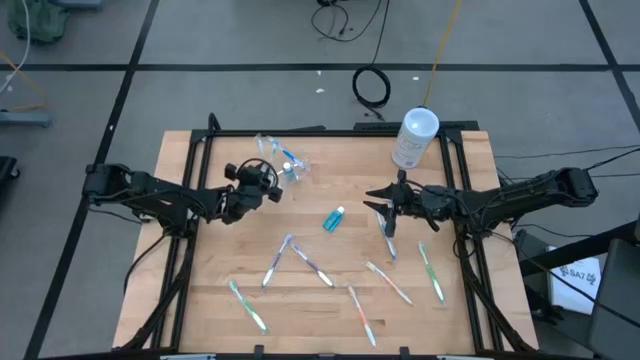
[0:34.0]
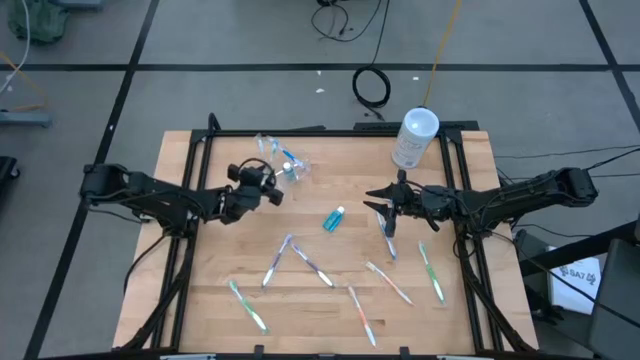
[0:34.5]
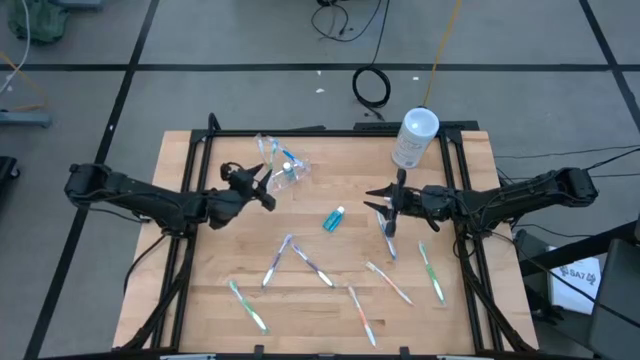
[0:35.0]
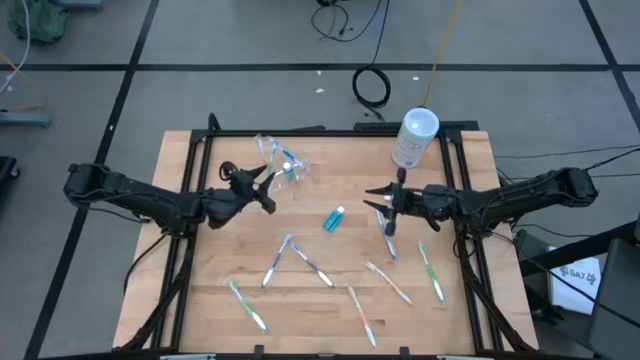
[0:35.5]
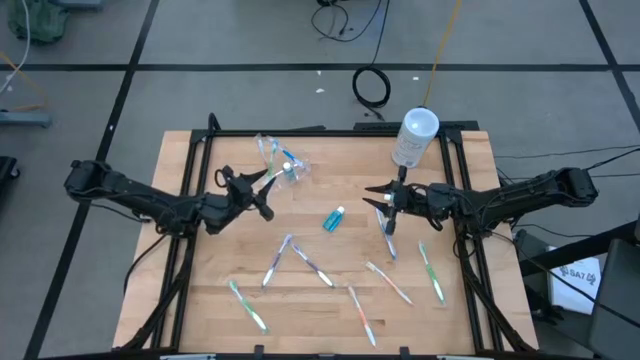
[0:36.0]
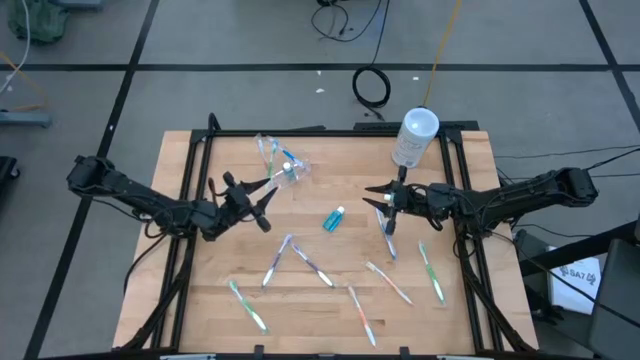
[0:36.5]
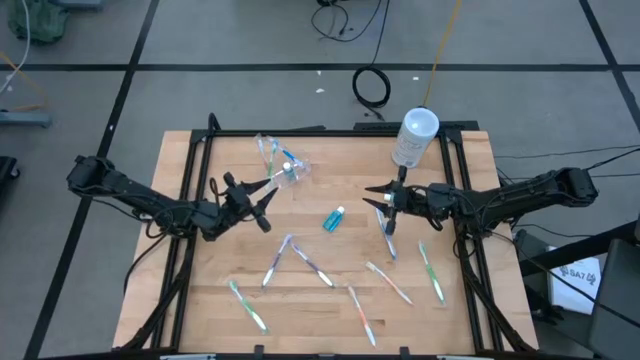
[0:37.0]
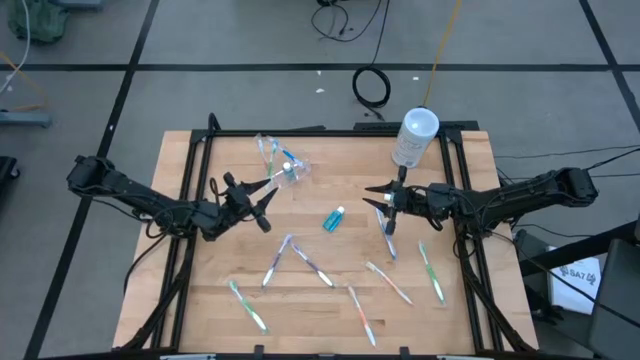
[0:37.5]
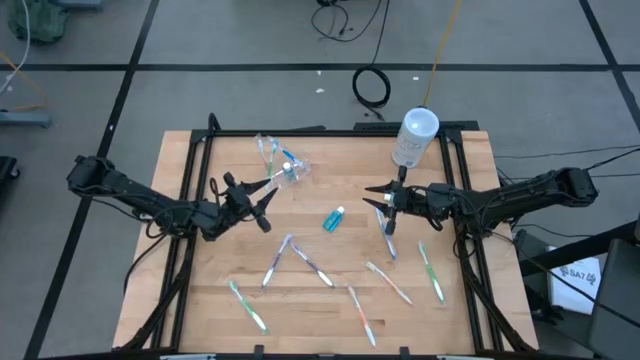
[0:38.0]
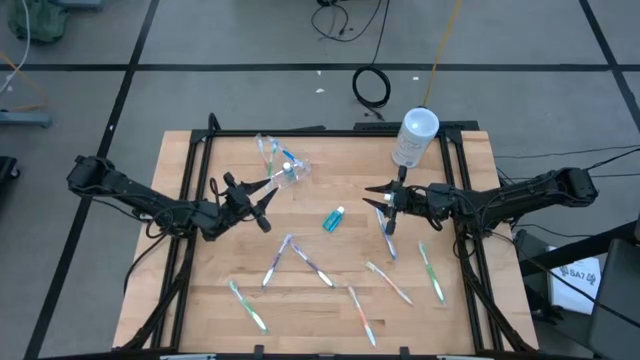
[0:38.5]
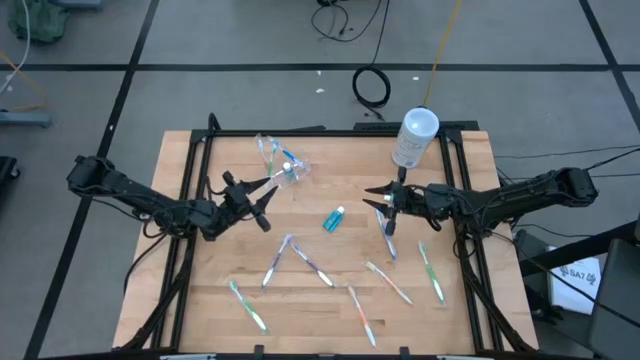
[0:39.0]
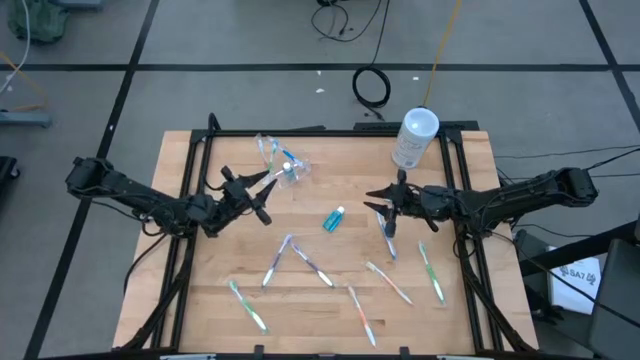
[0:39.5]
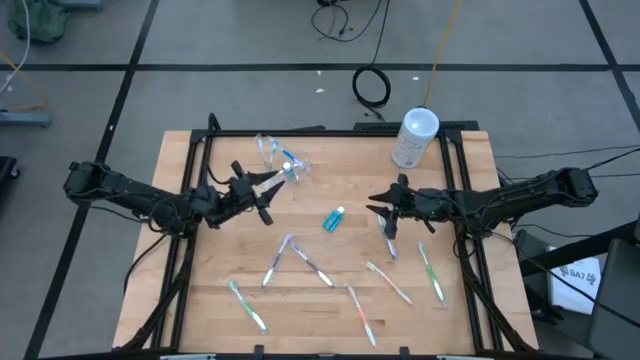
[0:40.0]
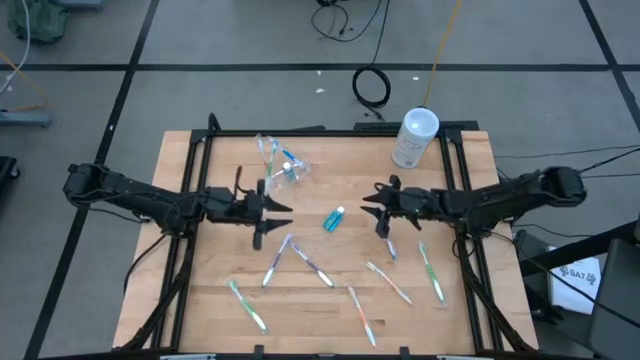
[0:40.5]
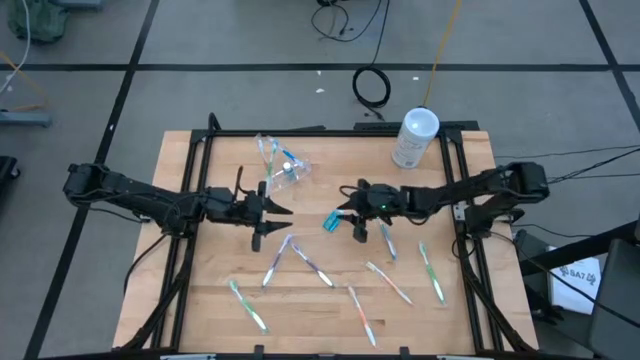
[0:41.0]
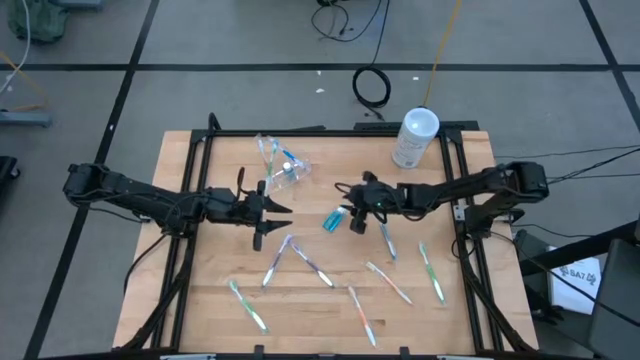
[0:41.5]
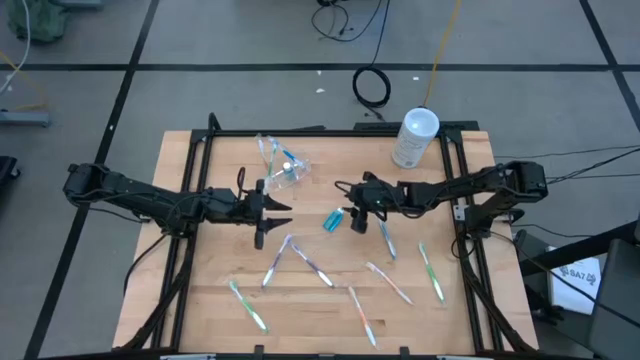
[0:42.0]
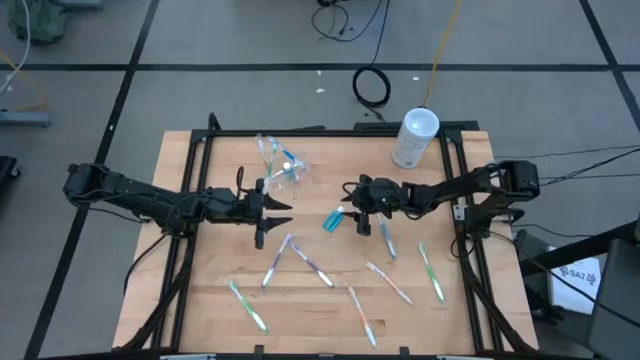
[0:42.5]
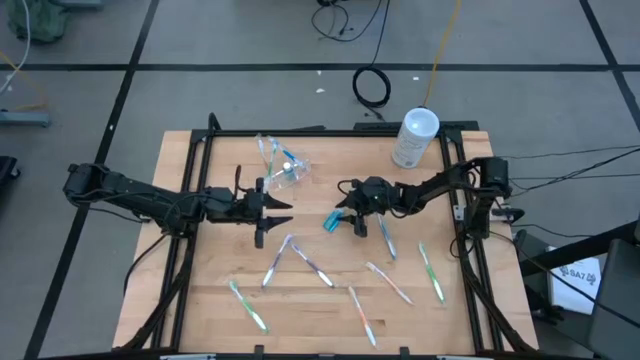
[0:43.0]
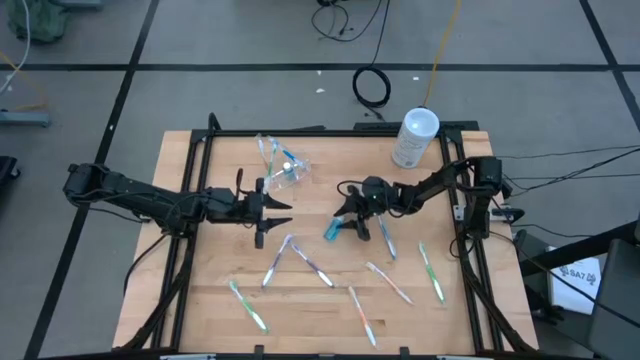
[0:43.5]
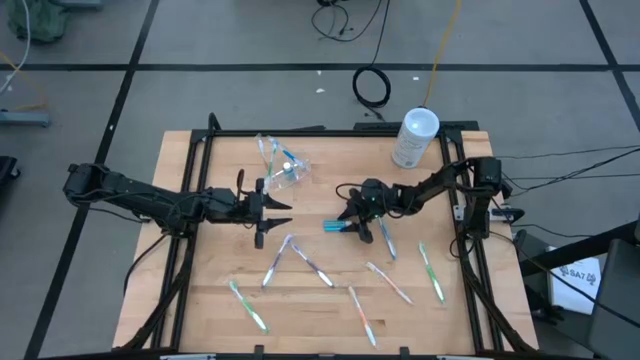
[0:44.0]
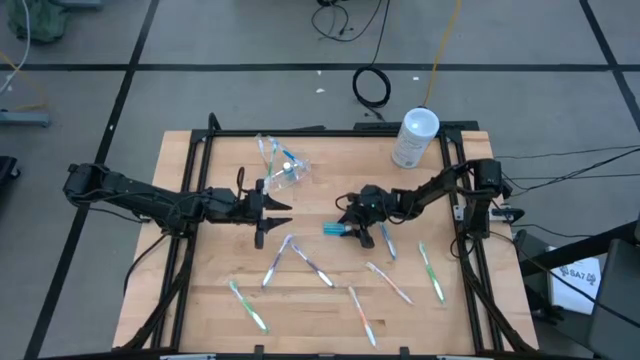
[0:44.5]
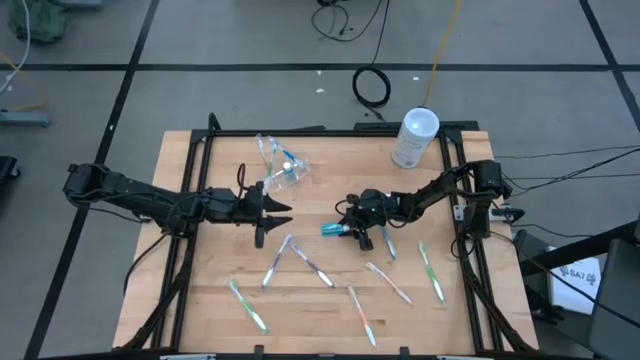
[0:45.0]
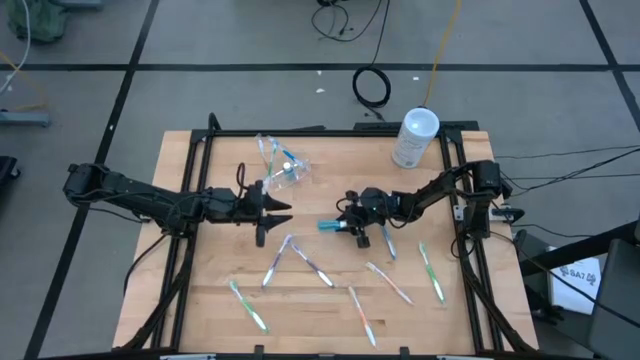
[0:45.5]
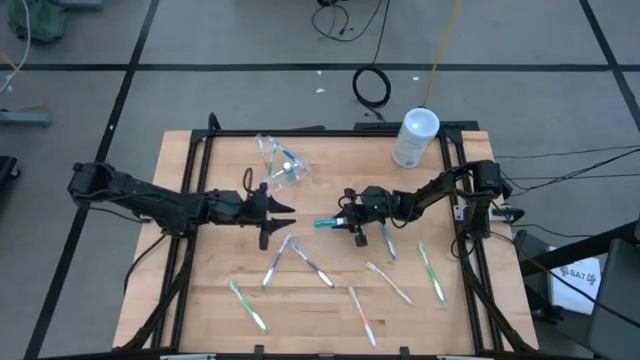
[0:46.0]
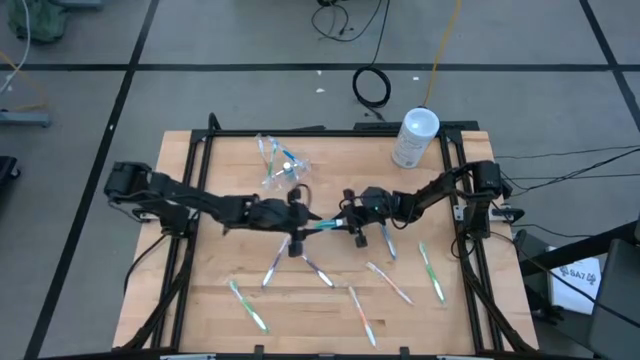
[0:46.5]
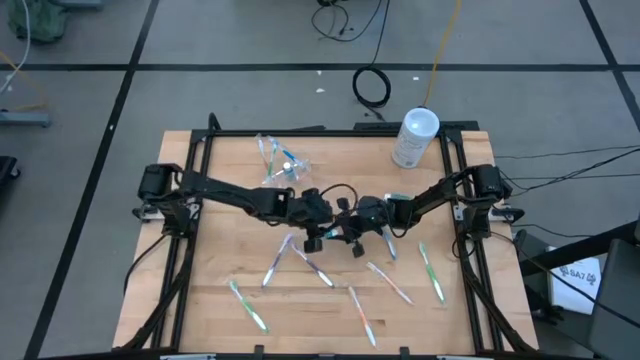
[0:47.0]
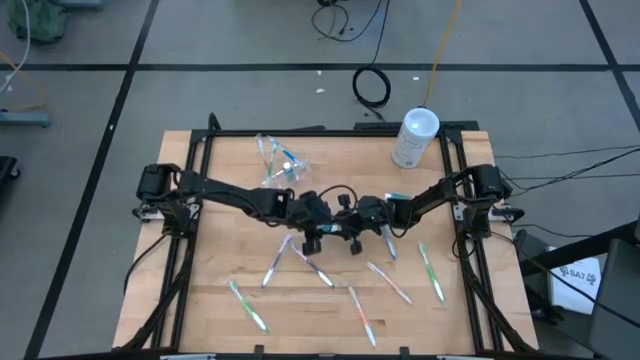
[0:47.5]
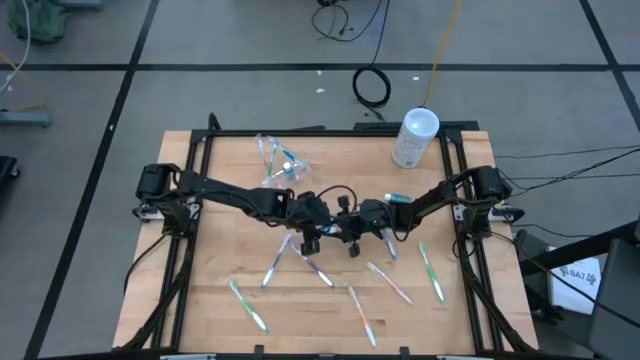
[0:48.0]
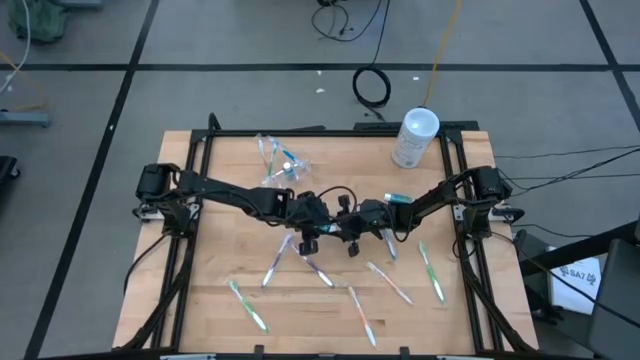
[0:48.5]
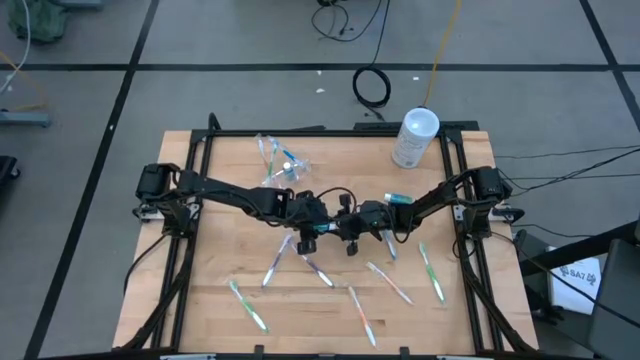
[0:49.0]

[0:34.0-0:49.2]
Task: Pick & Place toothbrushing station
Put the mouthwash into the transparent organizer

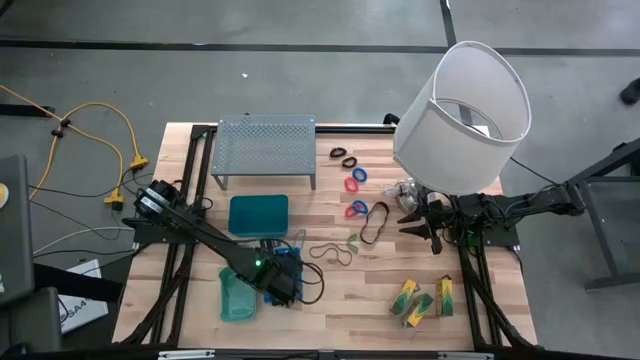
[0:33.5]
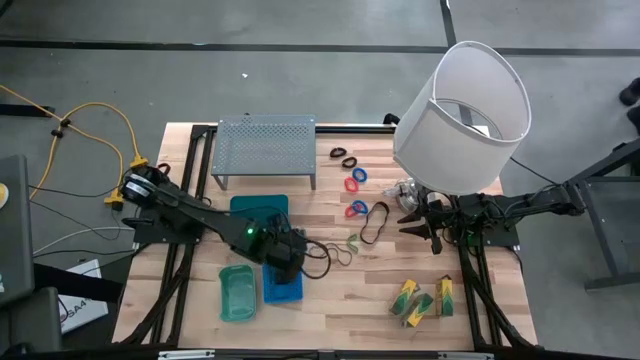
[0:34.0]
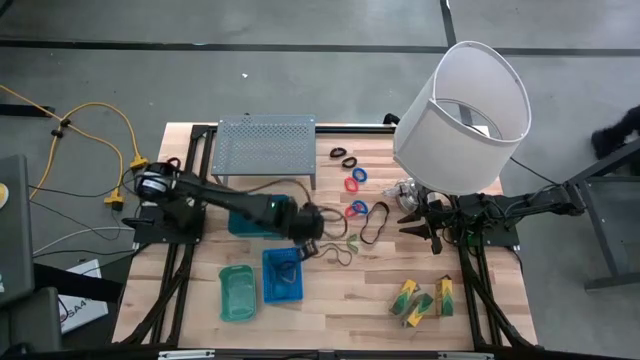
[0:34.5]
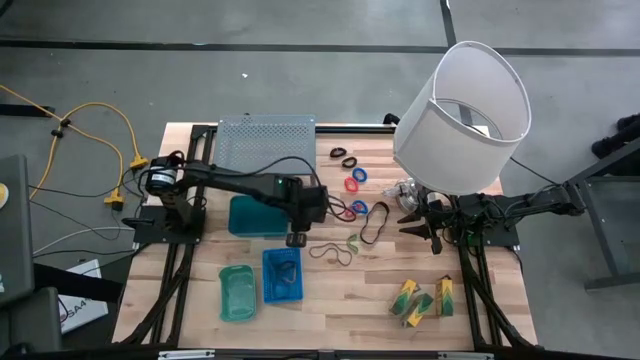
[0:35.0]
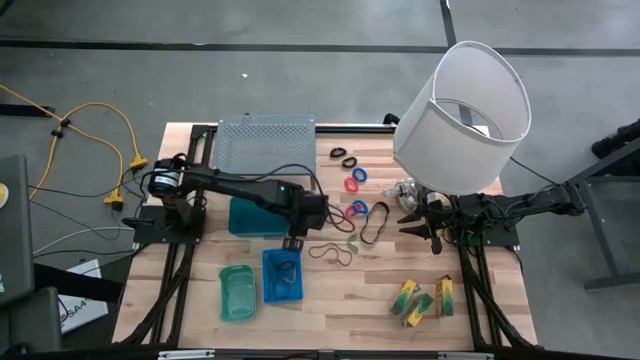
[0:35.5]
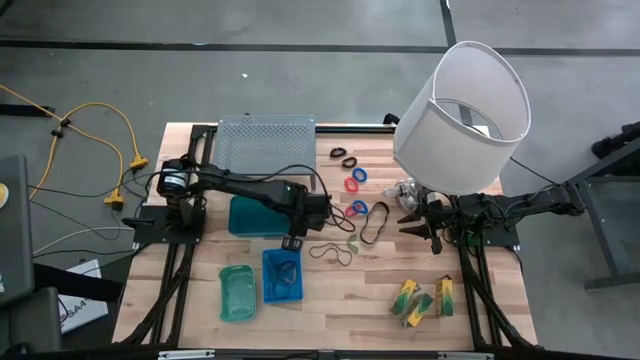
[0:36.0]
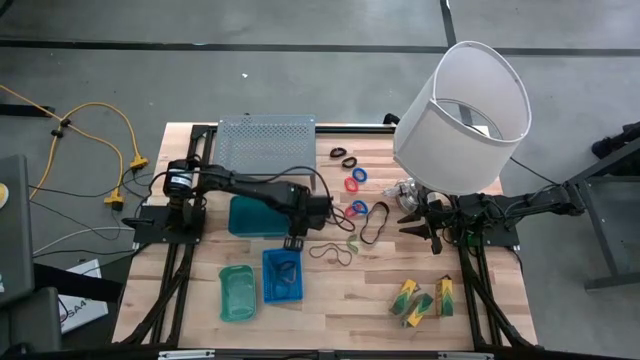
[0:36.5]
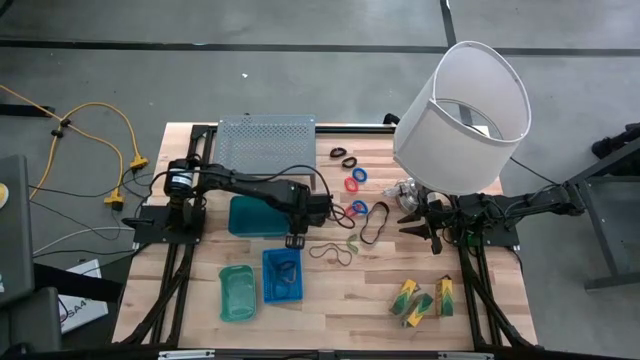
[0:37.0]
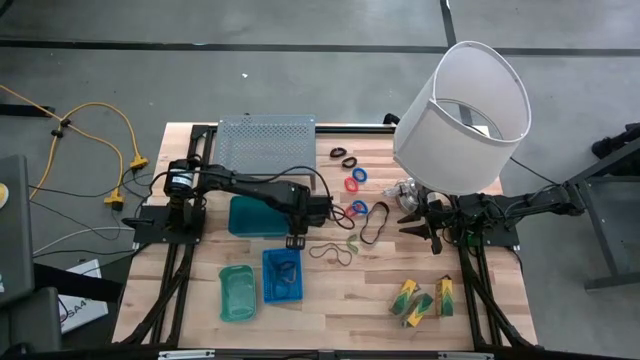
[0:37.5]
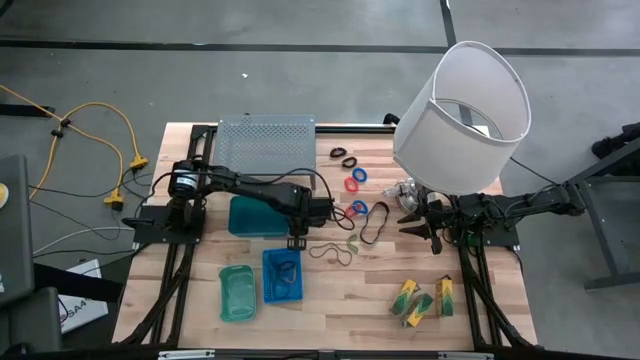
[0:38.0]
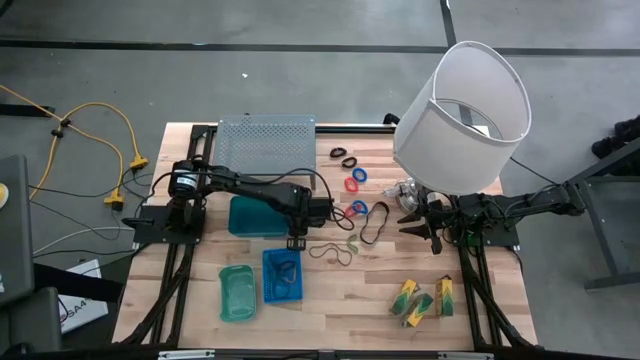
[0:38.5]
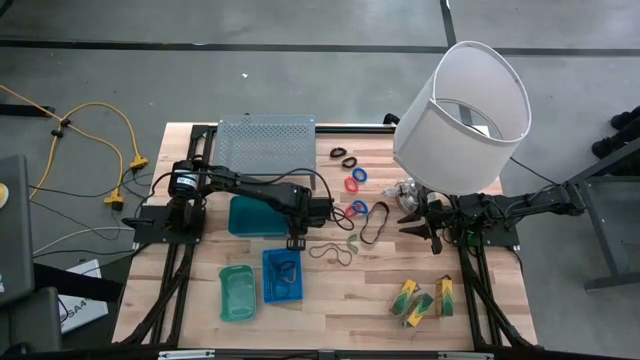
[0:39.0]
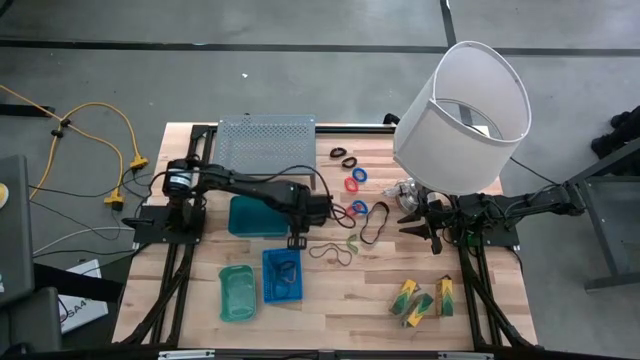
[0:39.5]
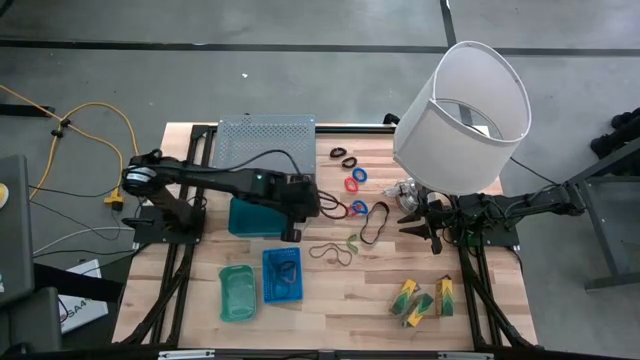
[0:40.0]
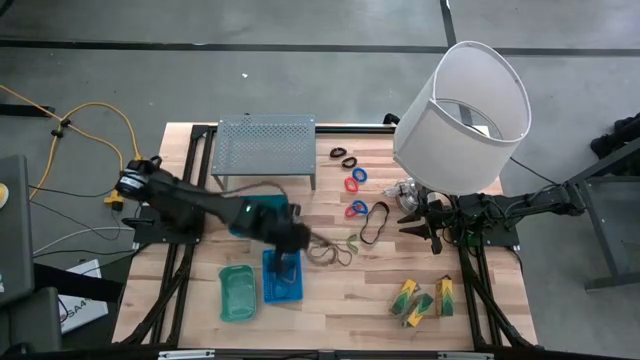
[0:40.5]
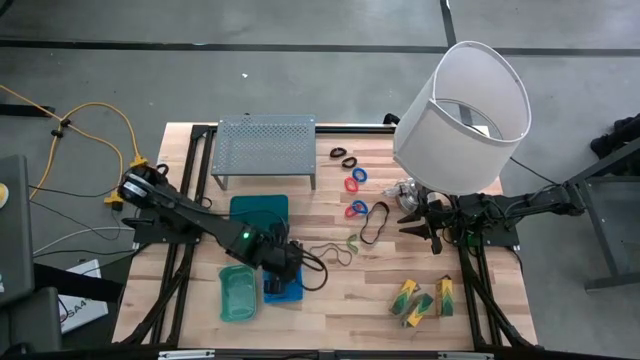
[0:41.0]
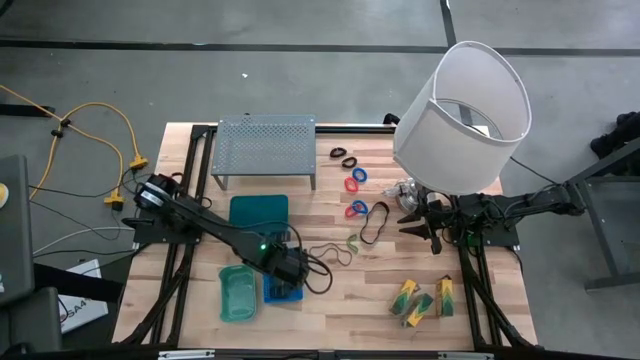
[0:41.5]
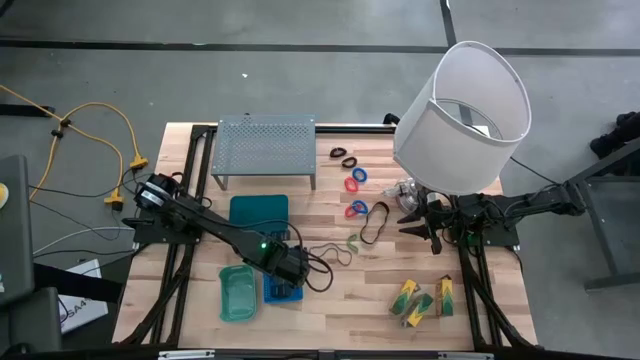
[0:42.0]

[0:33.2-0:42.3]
Task: Pick & Place Office Desk Supplies
Put the light blue rubber band into the bottom blue bin
